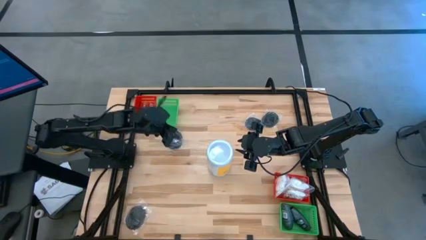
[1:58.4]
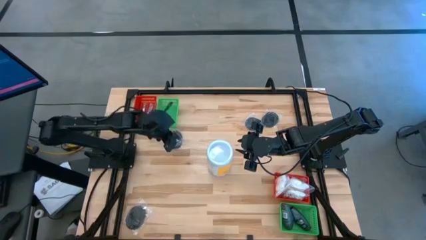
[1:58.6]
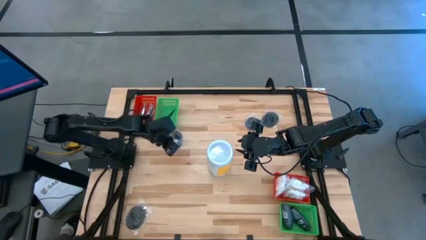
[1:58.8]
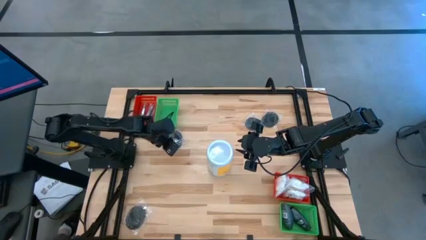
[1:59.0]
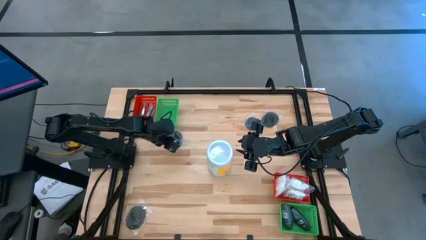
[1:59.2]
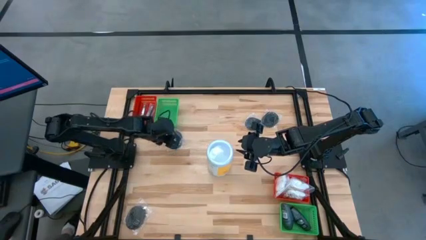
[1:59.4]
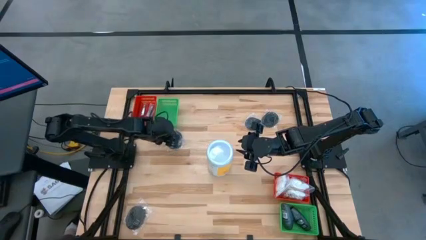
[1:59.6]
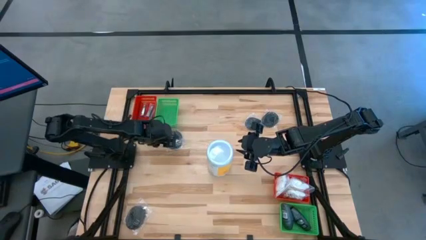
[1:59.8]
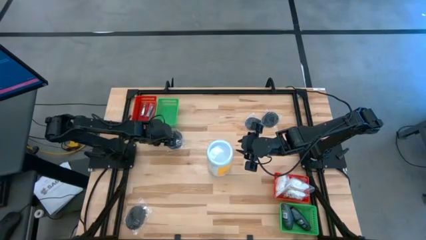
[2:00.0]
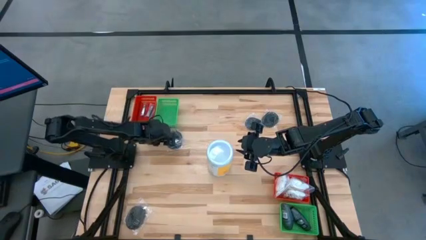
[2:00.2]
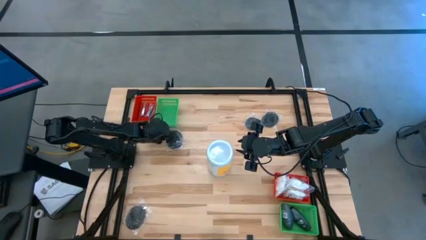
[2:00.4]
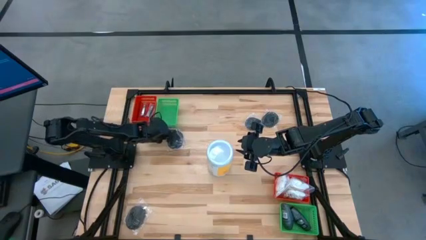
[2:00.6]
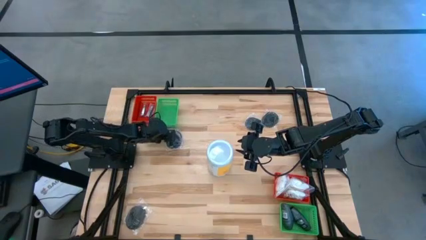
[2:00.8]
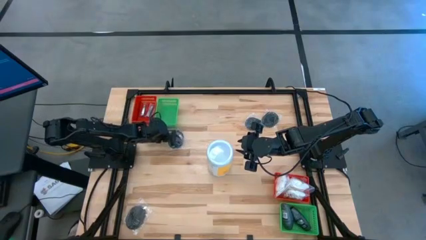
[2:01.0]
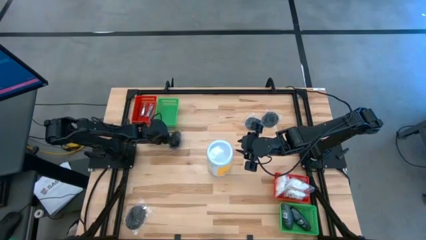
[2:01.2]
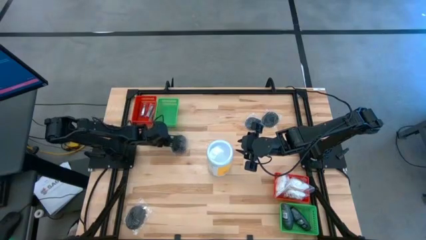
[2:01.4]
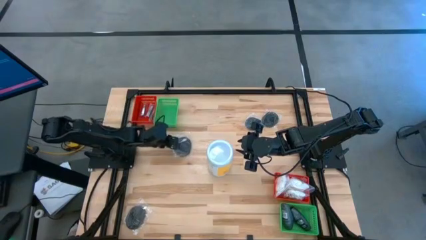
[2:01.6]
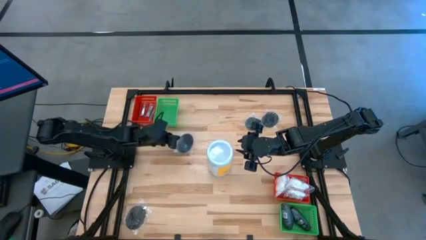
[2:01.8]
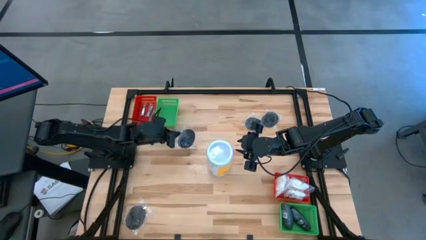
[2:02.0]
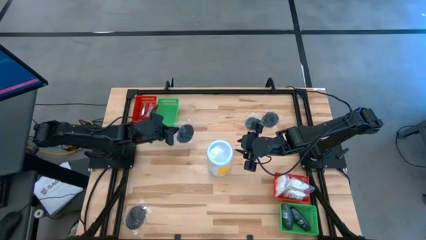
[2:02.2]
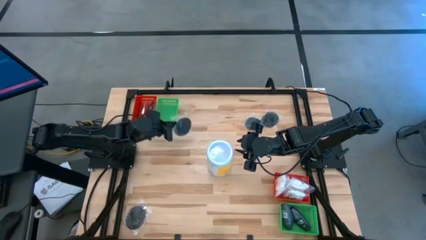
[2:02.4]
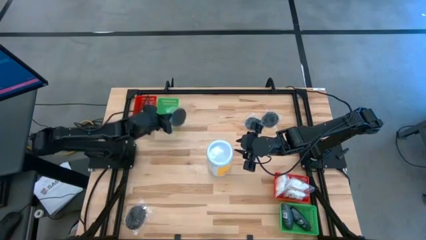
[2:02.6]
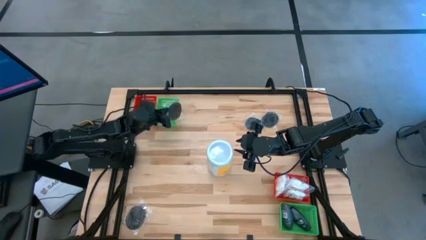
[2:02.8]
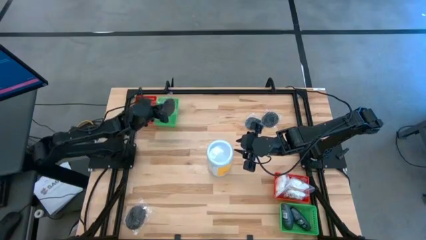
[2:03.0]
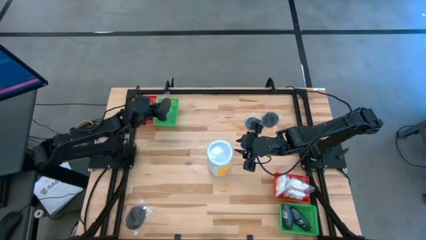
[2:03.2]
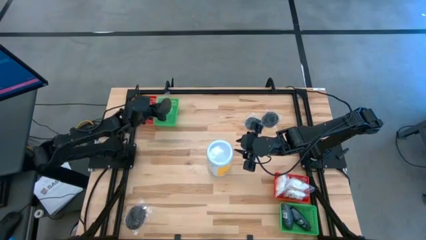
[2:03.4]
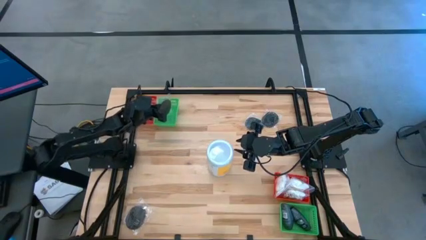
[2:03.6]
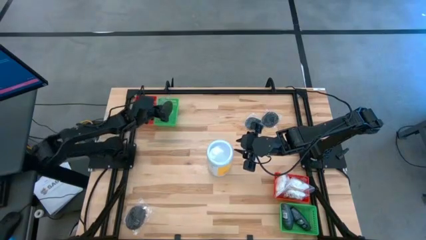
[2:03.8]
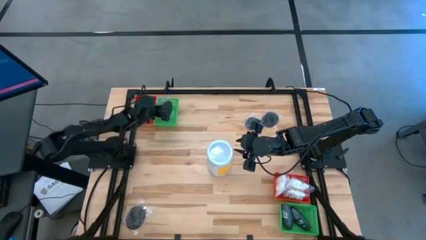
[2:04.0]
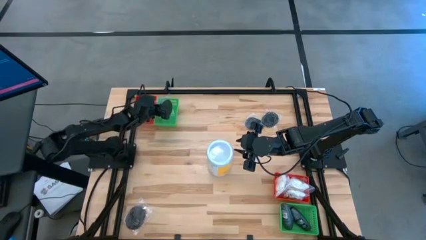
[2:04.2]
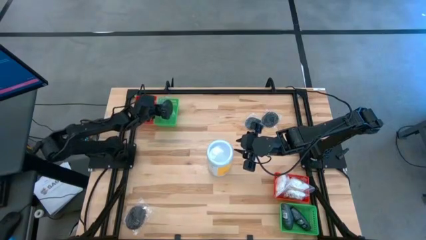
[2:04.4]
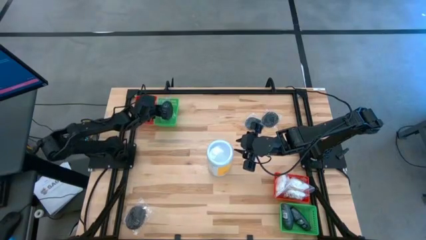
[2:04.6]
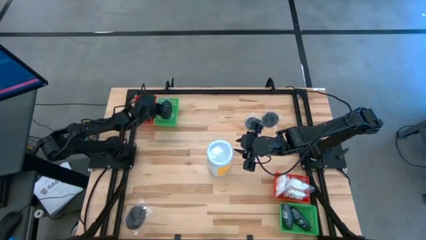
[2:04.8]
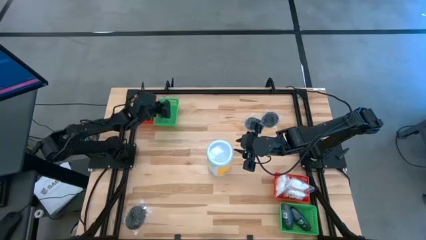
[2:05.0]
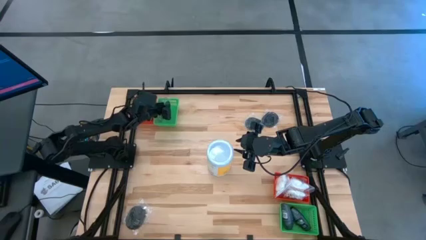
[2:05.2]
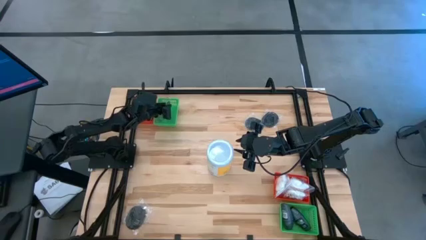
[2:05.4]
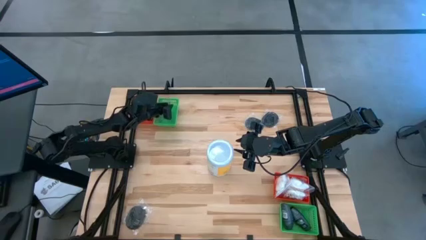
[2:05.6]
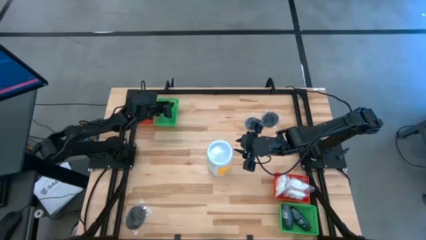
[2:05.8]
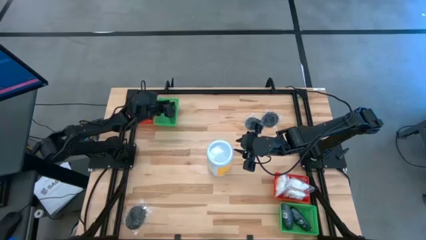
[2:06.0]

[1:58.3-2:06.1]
Task: Pick & Place Travel size toiletries
Put the black hairbrush into the top green basket

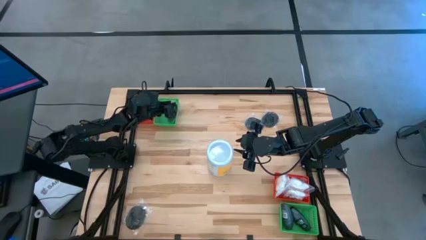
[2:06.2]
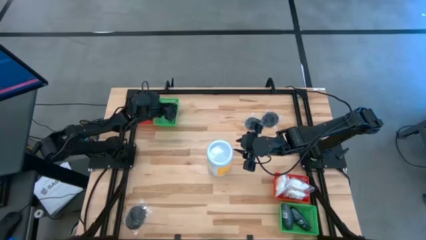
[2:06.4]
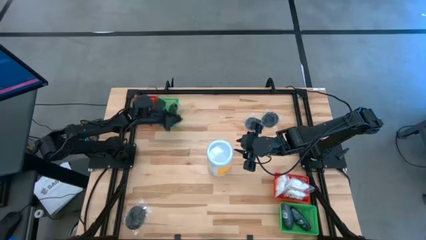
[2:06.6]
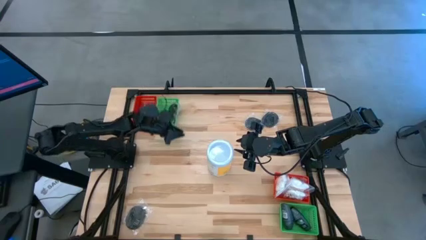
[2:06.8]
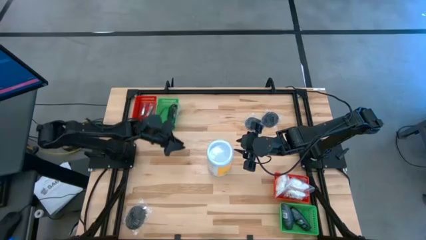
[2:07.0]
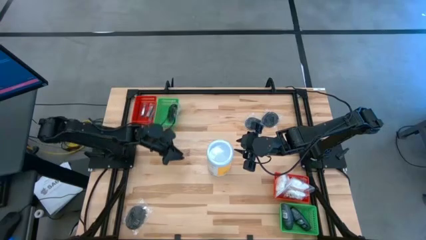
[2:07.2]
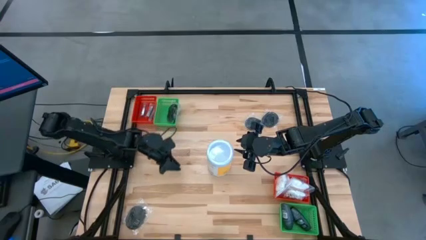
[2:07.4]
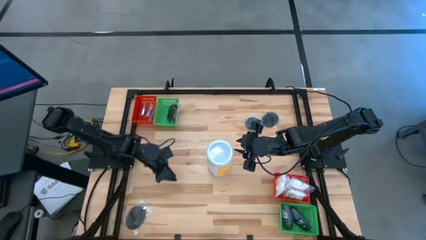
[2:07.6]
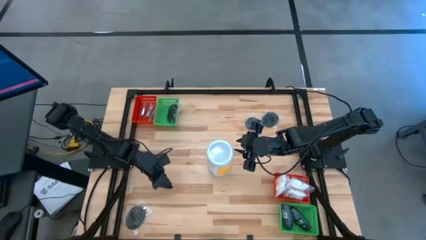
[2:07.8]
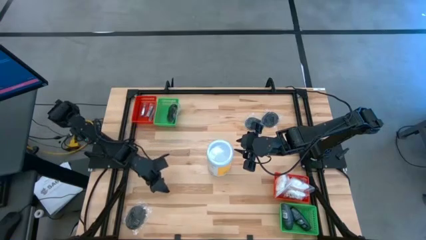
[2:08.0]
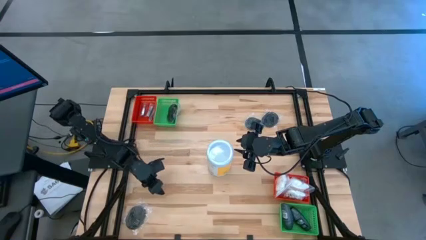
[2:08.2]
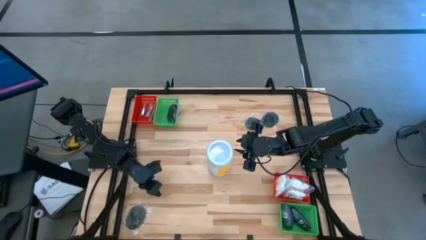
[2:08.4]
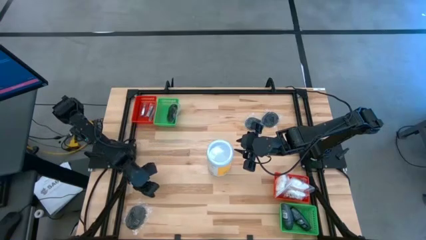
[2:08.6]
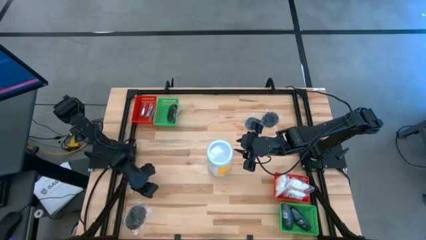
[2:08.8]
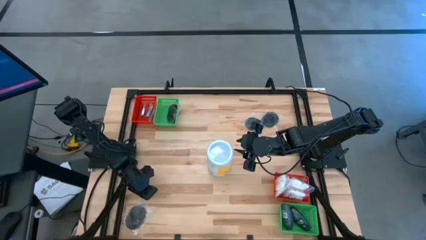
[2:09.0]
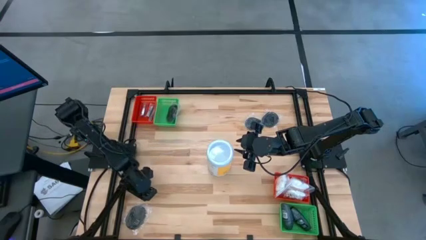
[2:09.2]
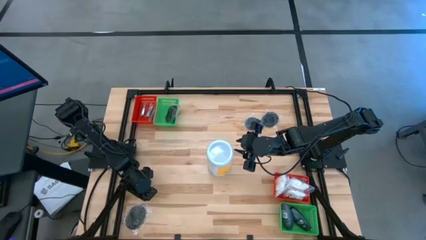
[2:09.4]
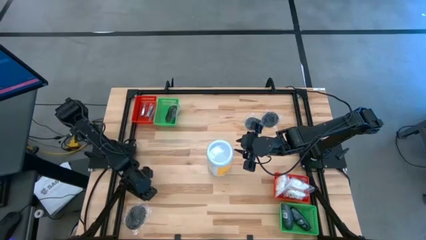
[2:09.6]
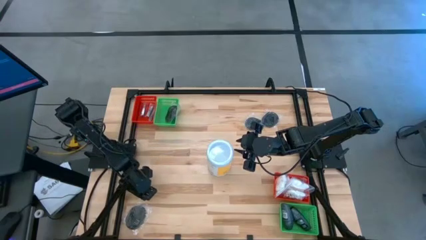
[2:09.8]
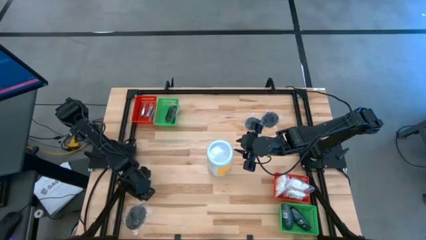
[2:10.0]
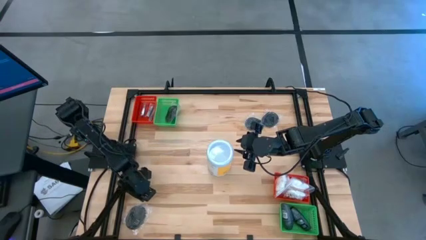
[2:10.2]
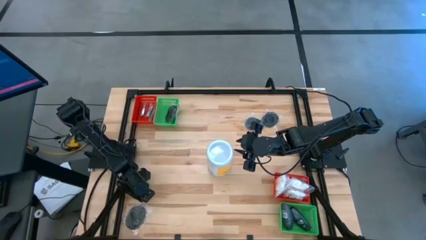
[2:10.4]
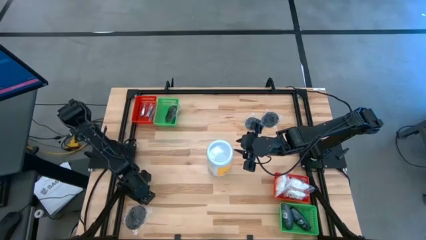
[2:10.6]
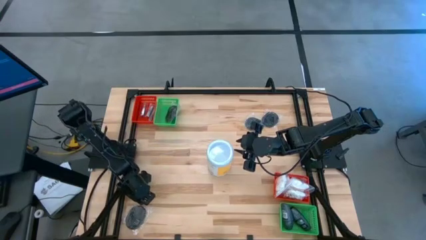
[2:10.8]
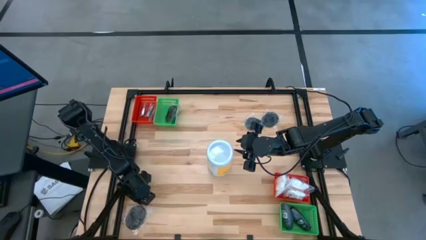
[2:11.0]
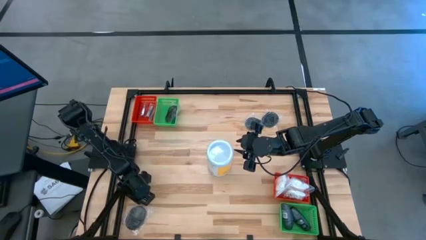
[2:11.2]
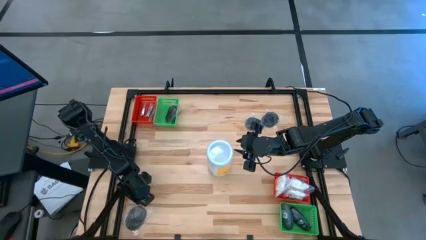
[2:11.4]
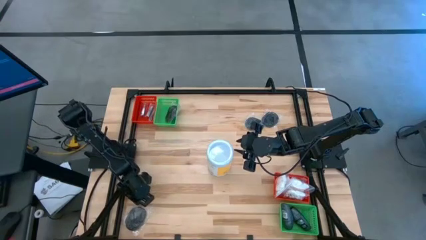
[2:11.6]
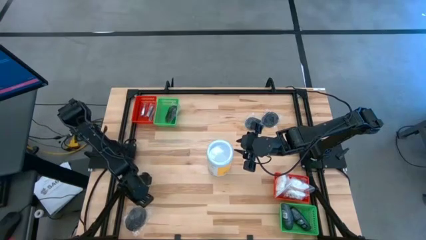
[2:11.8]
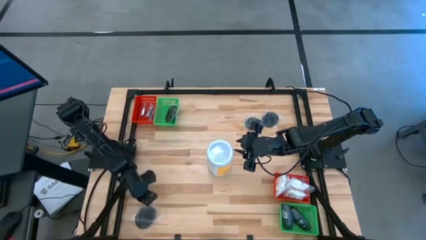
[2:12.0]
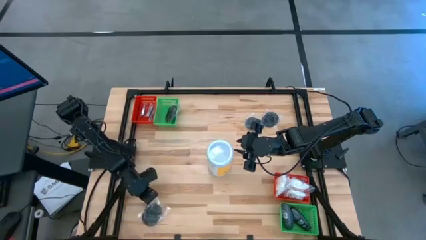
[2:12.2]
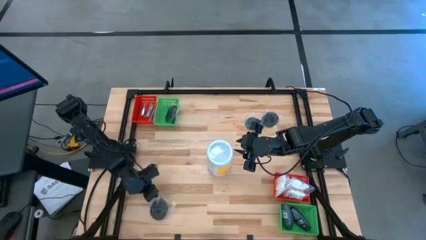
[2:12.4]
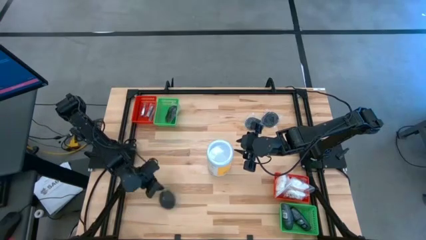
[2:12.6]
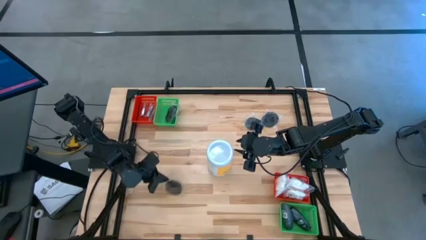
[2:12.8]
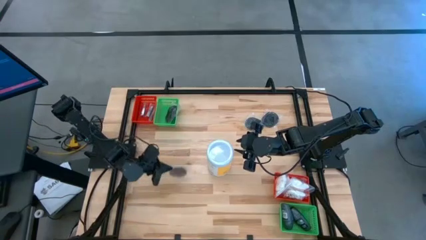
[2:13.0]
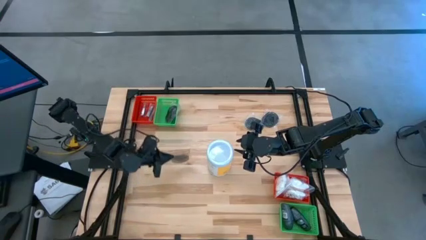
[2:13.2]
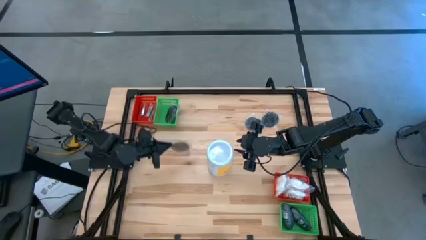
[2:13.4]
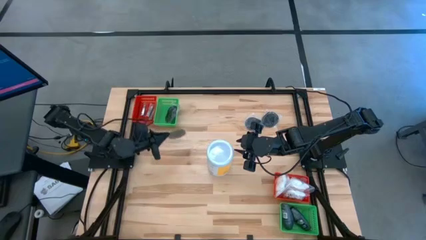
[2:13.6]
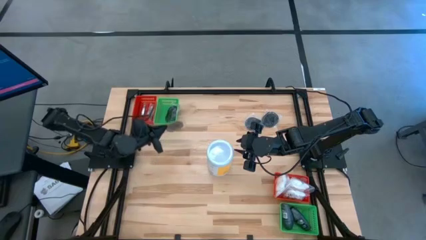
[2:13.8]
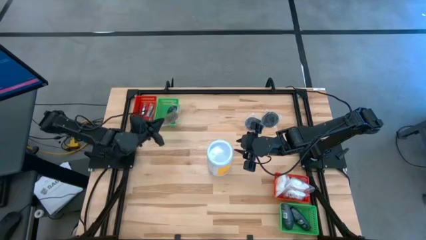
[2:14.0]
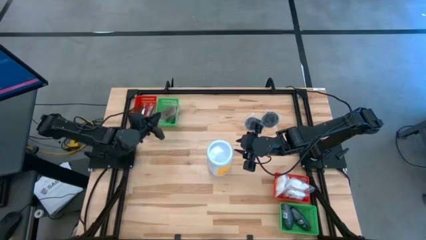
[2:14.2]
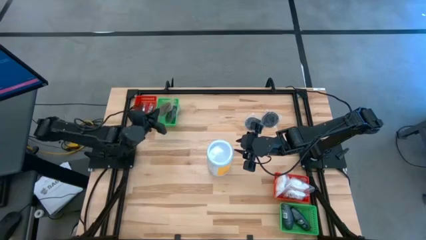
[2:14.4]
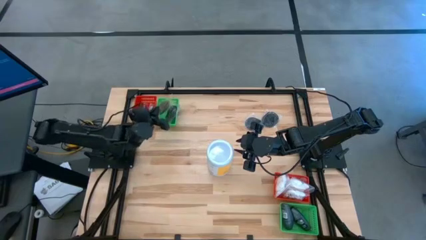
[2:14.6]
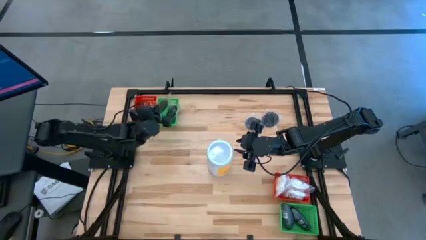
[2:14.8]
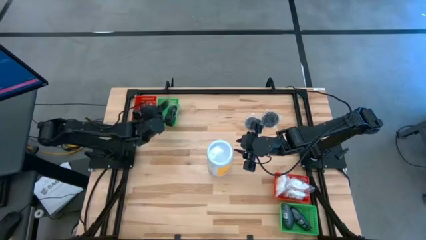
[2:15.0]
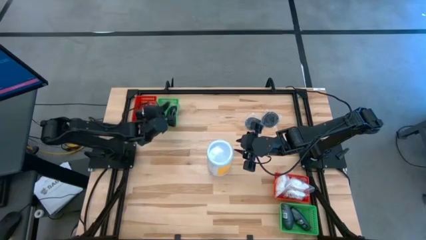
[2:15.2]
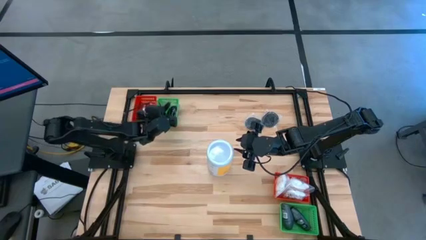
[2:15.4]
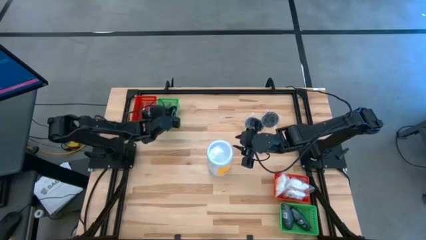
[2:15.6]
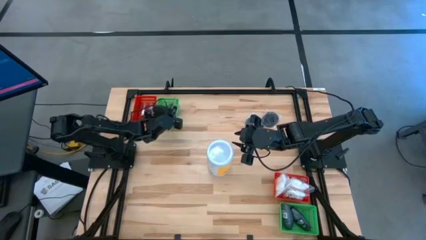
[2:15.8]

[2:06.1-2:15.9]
Put the black hairbrush into the top green basket
